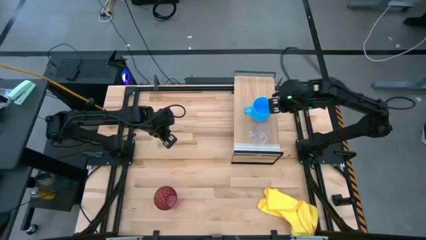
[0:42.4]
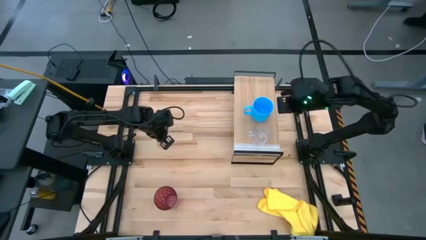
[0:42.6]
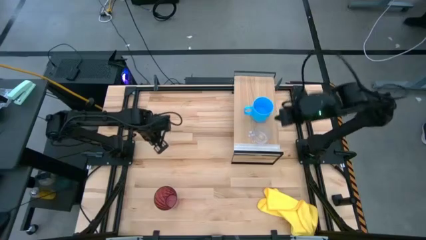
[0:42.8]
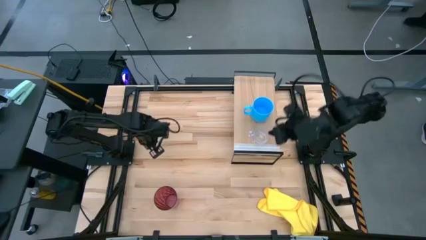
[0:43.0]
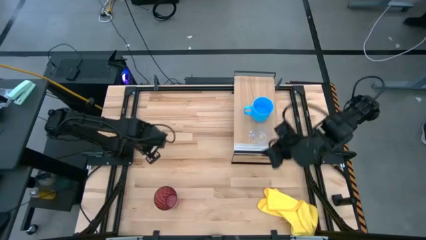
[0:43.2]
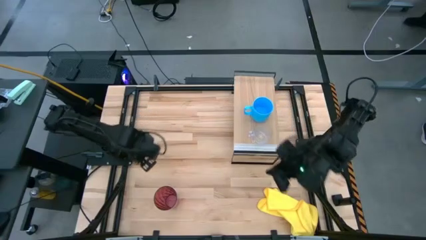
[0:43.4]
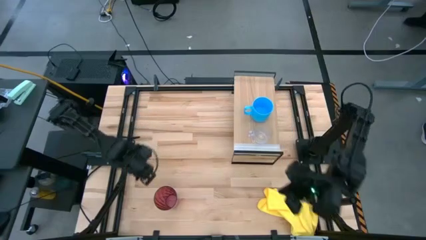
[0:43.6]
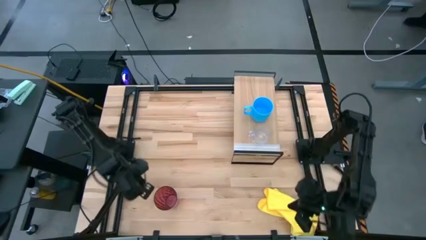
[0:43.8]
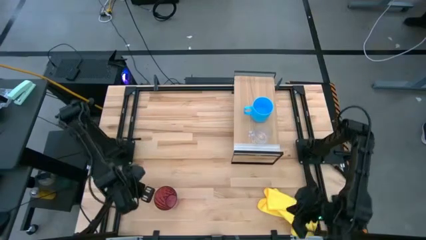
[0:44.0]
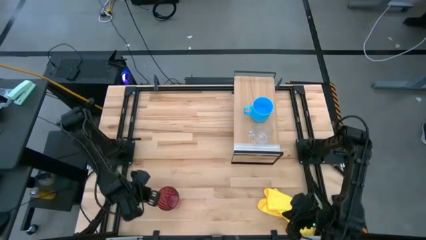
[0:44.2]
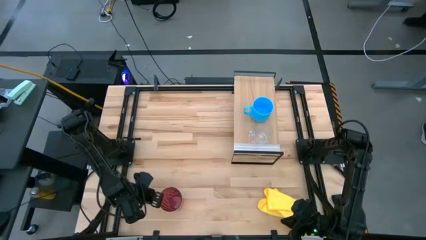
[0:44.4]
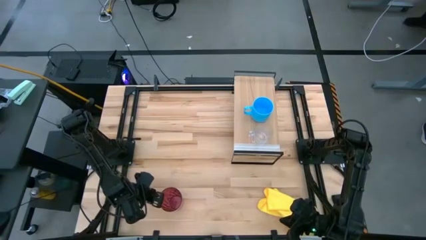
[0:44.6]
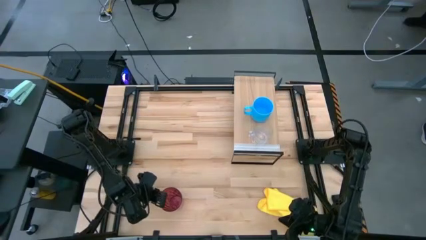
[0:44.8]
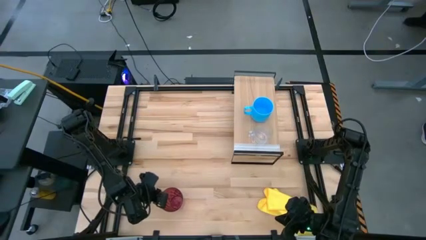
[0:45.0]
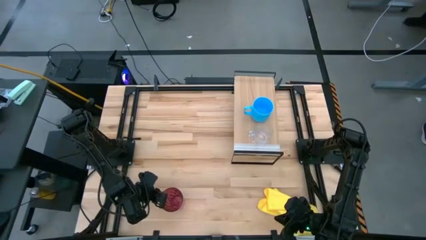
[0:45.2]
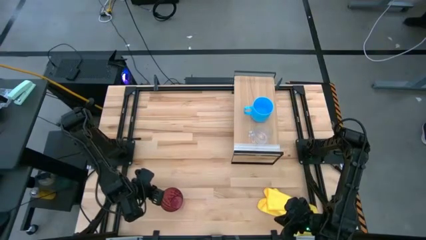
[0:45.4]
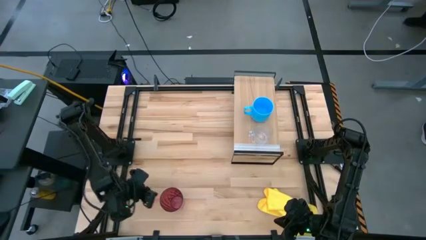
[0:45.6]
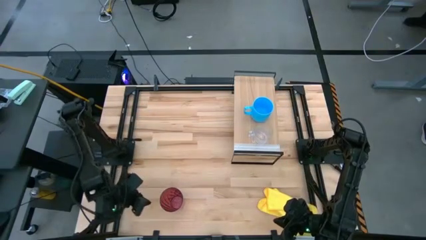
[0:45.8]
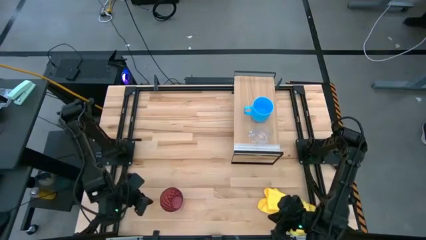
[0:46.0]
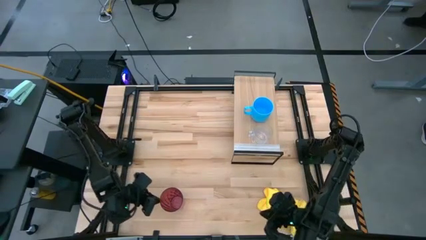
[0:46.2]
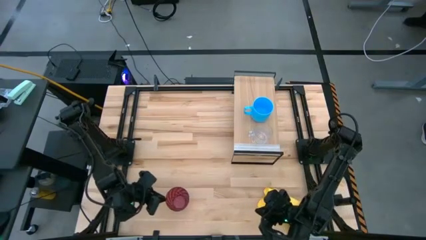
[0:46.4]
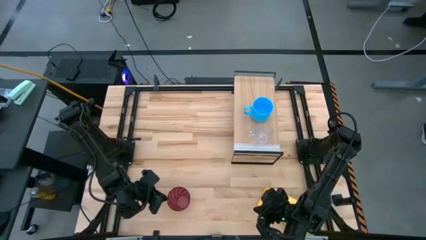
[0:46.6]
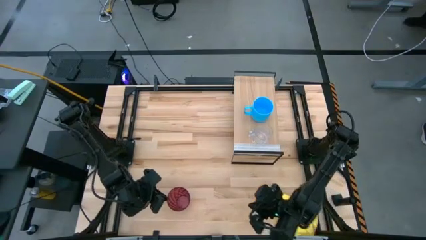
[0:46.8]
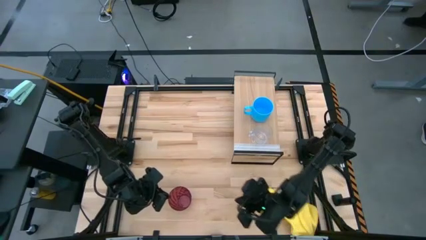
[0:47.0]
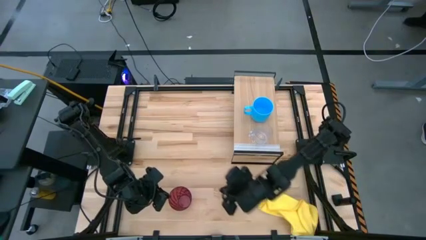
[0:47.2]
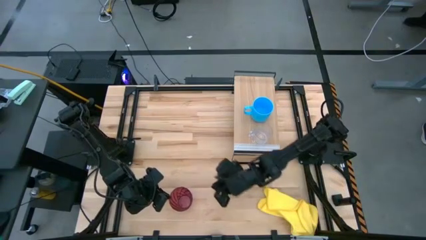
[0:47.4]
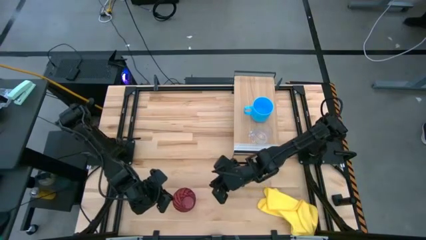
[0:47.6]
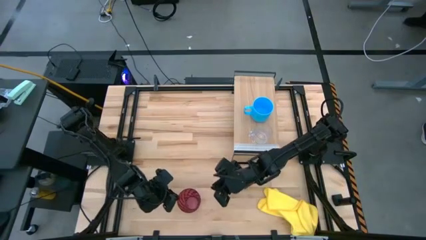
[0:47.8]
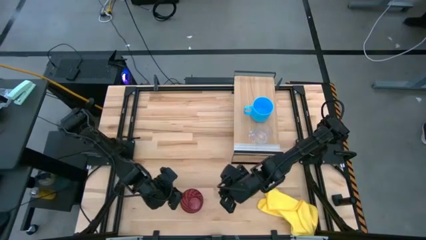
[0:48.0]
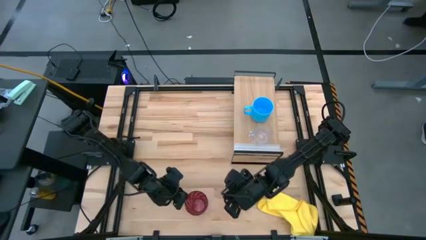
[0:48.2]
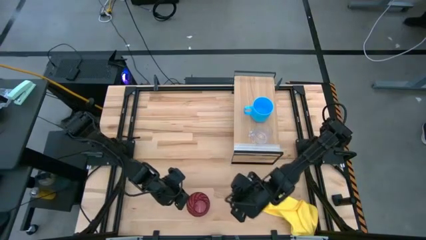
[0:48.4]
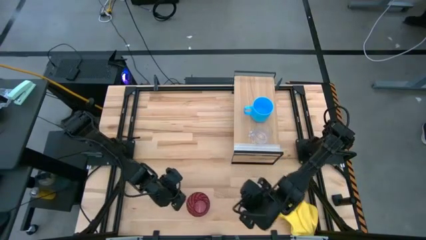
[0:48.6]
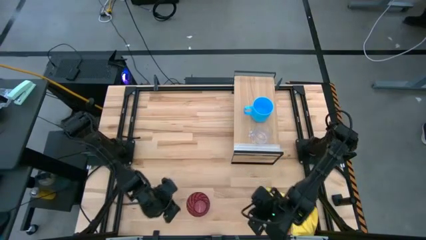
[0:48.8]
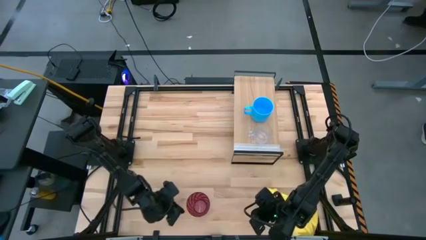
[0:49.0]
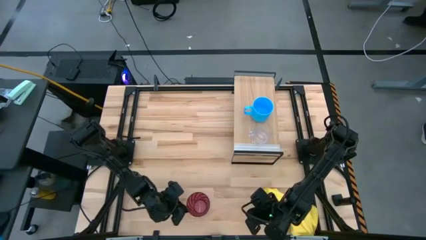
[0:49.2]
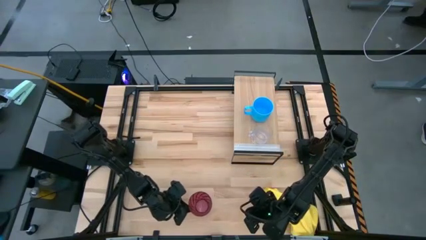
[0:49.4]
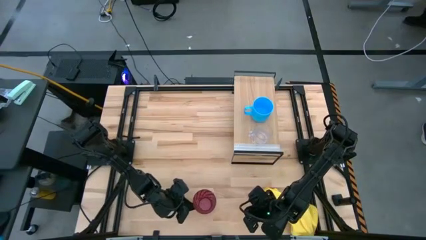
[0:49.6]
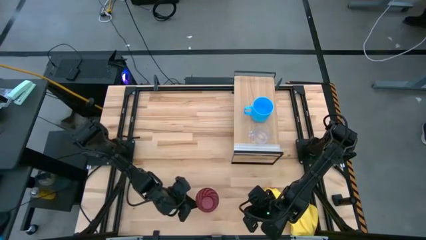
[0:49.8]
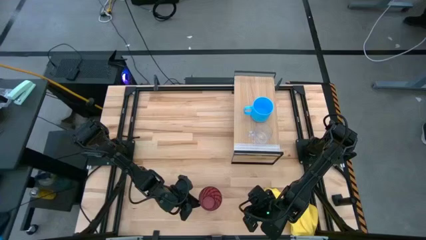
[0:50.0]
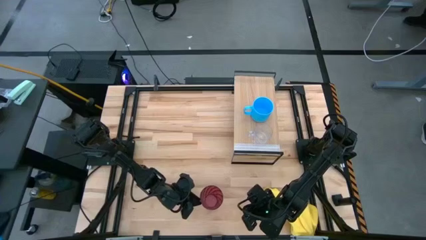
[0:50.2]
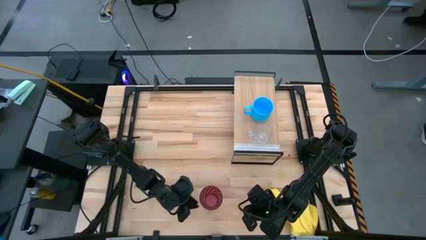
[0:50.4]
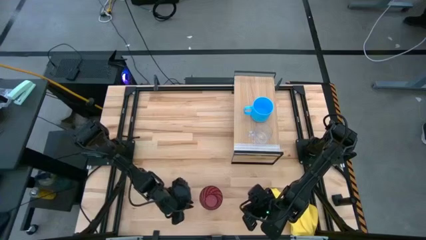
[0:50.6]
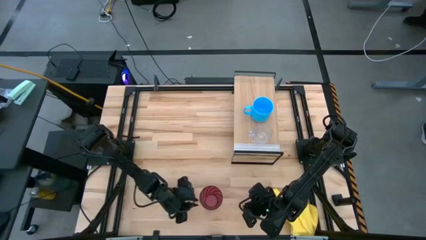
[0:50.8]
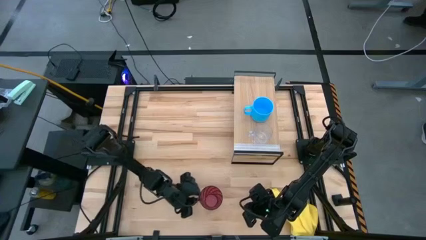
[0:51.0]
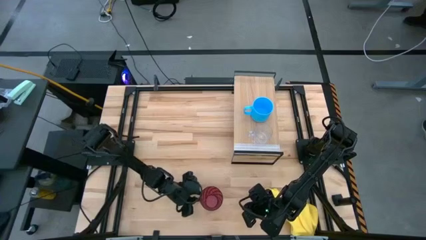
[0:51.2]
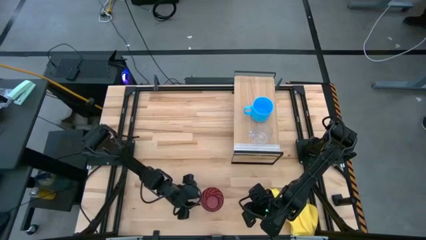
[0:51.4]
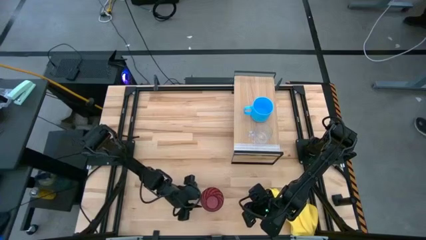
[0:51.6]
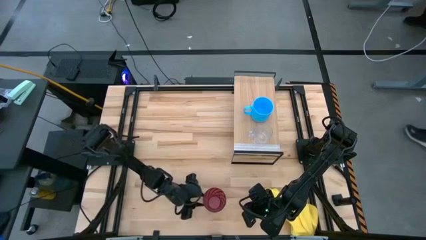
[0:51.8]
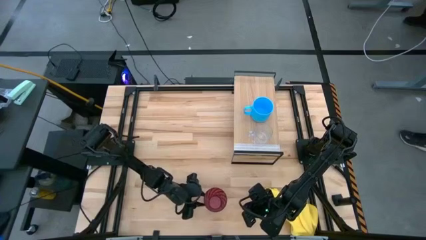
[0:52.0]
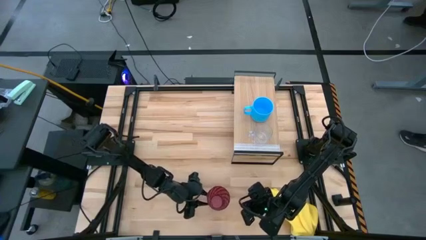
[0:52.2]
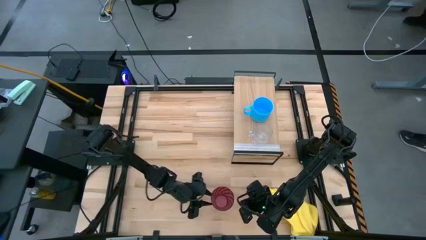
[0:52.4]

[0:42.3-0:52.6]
Task: Stack small to large cups/mugs on shelf
Put the red cup on the shelf
